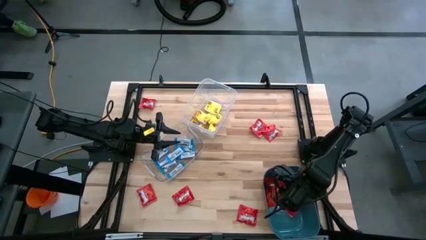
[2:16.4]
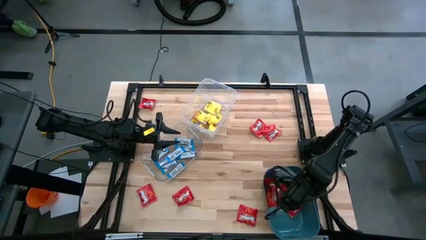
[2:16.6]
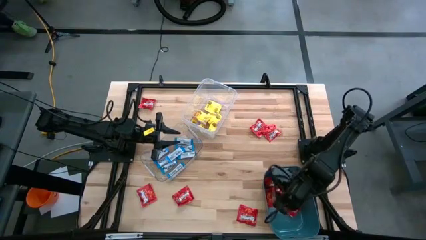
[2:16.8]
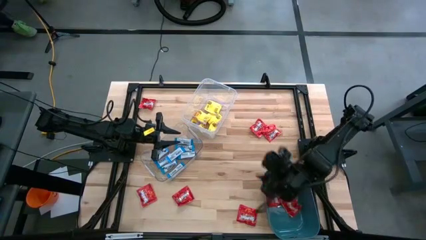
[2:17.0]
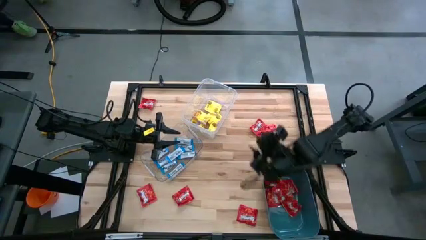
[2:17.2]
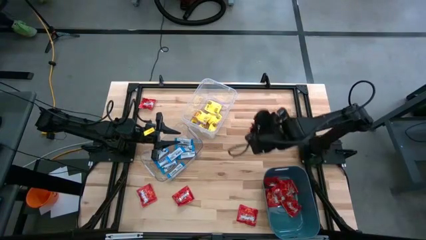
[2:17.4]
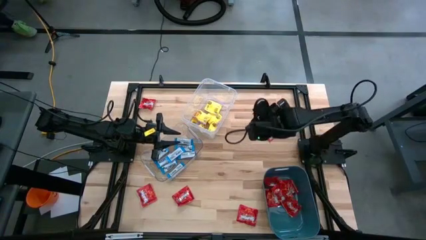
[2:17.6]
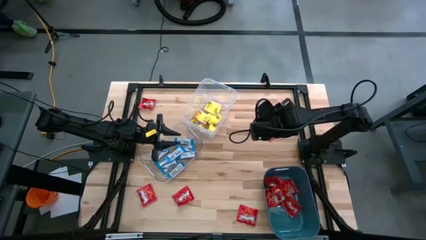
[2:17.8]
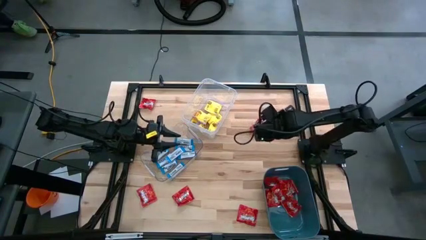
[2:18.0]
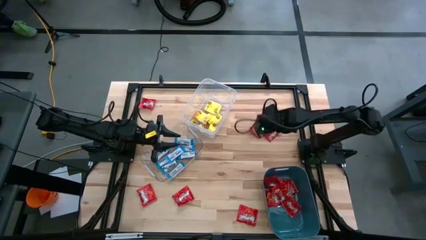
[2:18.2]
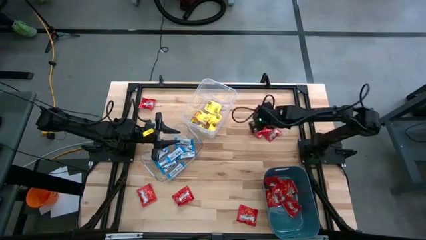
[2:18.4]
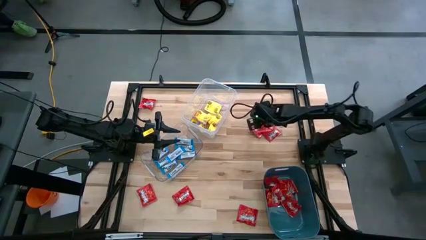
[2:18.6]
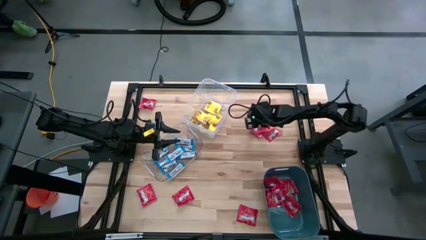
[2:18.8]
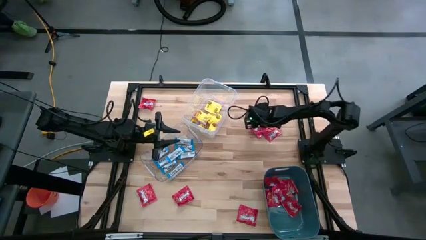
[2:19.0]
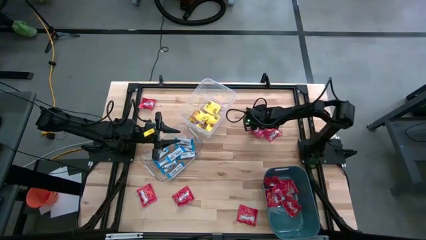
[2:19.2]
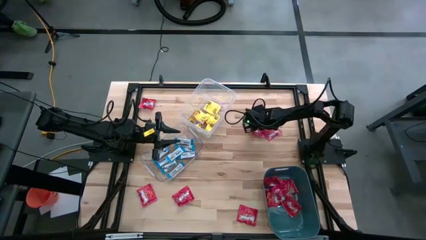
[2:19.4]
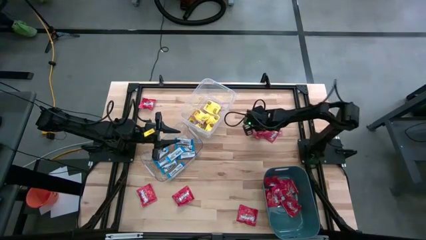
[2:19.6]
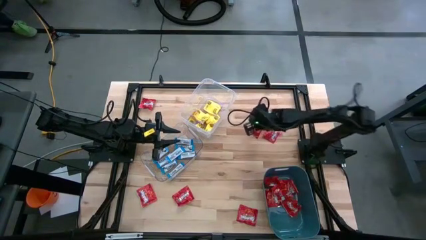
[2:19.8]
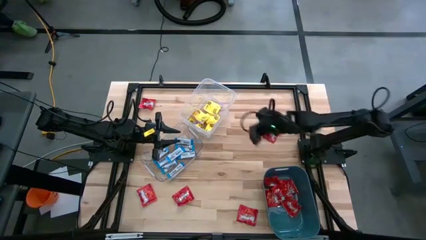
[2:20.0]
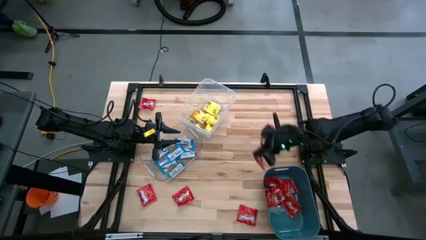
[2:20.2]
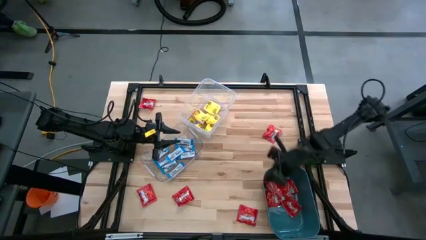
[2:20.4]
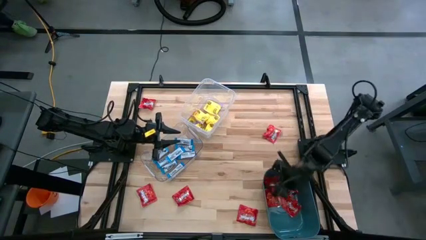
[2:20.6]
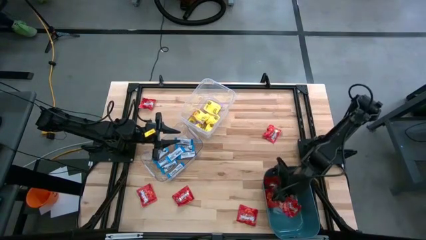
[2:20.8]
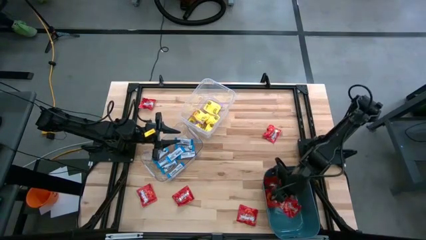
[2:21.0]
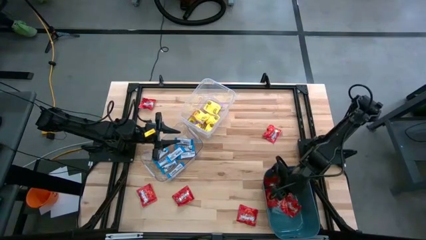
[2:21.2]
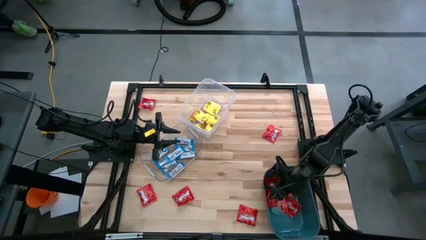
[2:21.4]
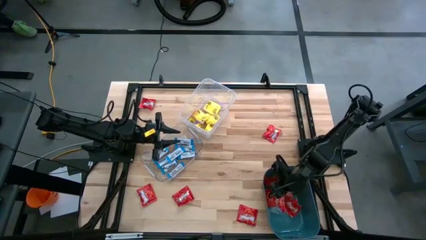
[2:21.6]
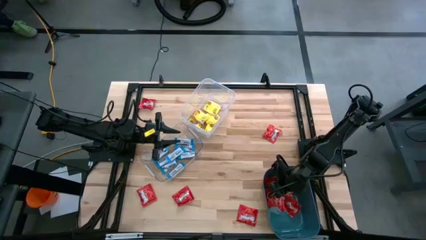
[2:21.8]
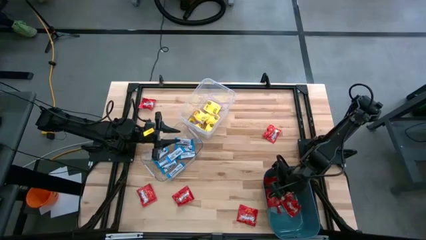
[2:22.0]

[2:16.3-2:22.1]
Task: Sort candy
Put the red candy into the blue bin

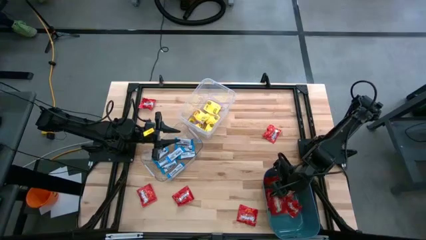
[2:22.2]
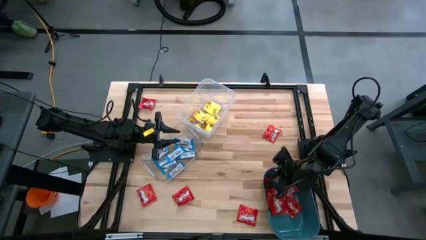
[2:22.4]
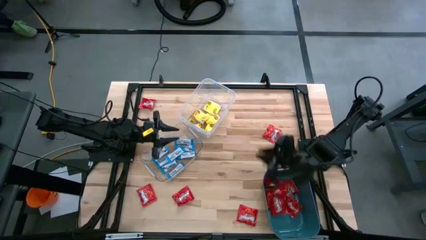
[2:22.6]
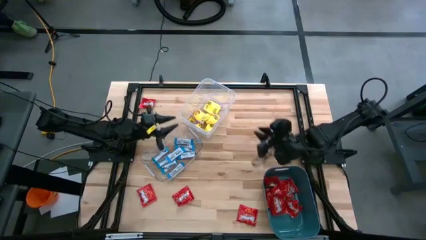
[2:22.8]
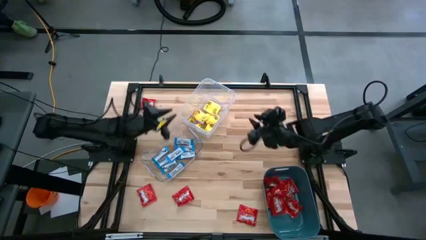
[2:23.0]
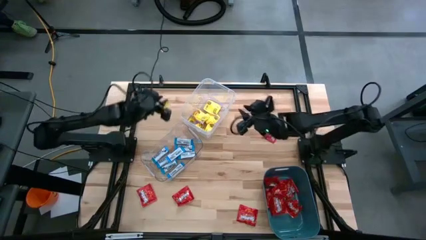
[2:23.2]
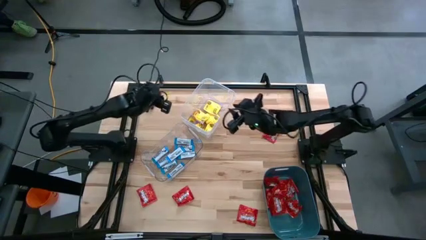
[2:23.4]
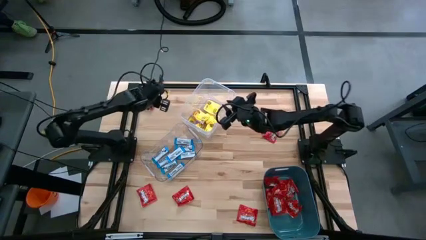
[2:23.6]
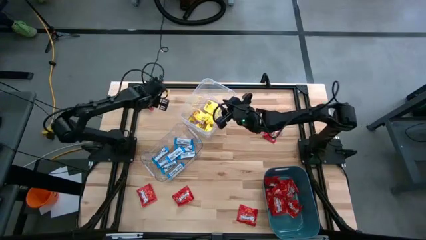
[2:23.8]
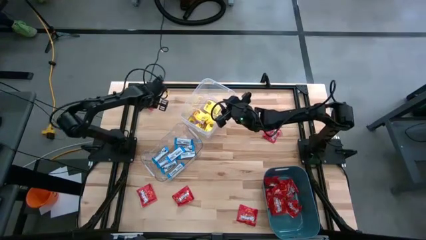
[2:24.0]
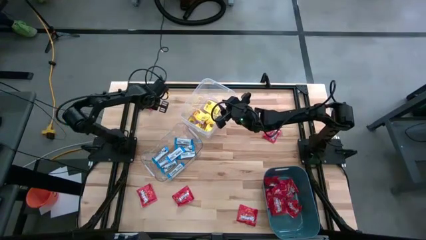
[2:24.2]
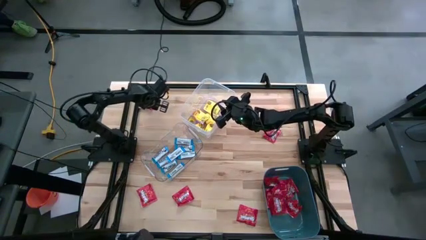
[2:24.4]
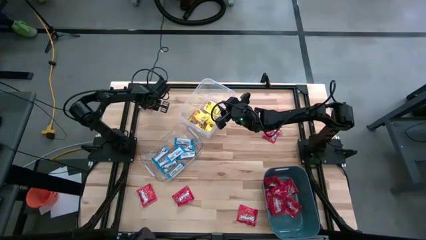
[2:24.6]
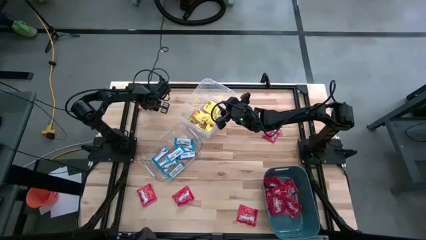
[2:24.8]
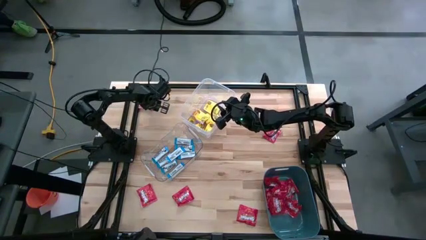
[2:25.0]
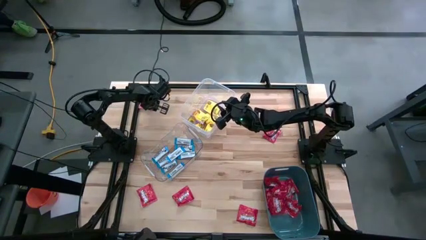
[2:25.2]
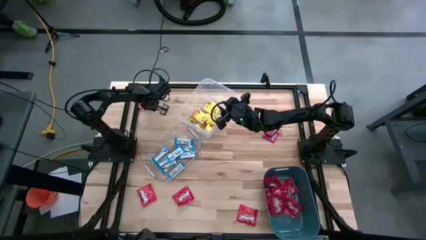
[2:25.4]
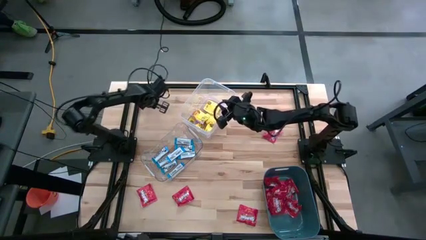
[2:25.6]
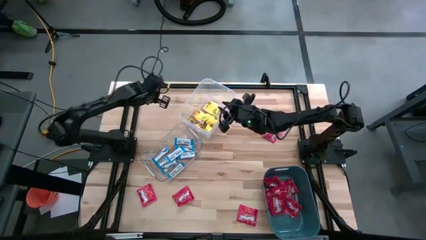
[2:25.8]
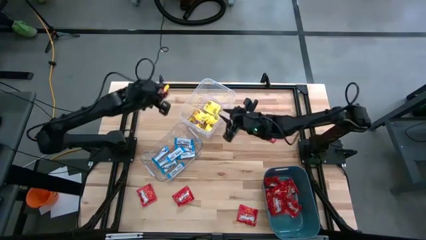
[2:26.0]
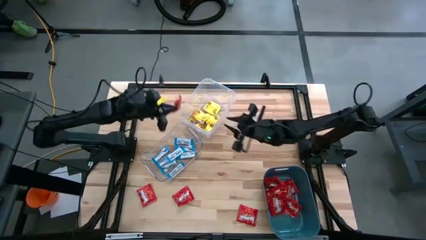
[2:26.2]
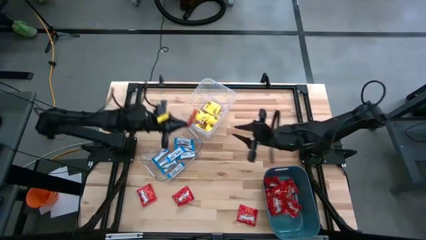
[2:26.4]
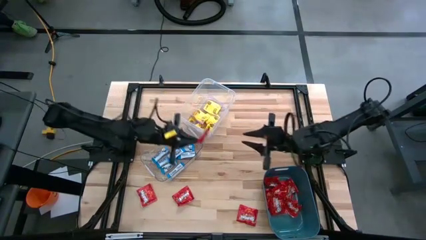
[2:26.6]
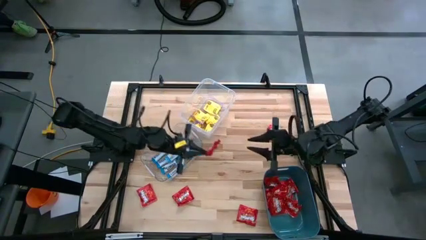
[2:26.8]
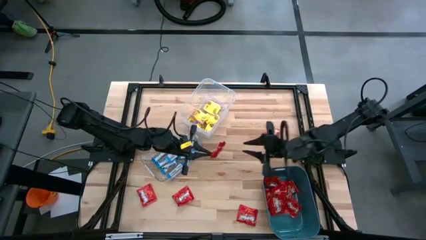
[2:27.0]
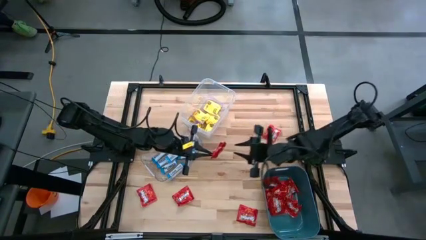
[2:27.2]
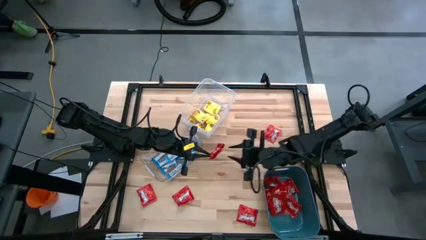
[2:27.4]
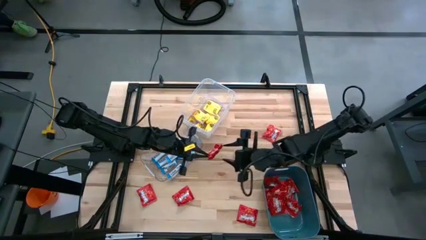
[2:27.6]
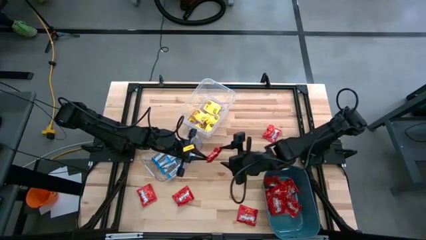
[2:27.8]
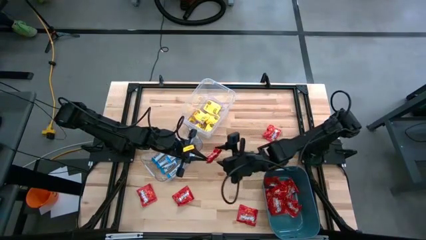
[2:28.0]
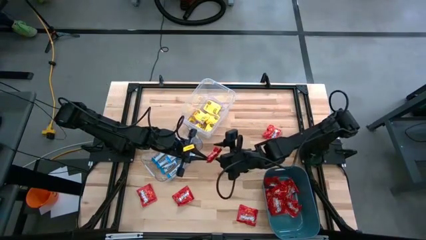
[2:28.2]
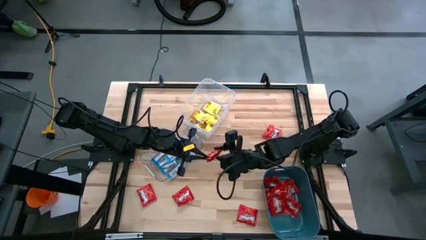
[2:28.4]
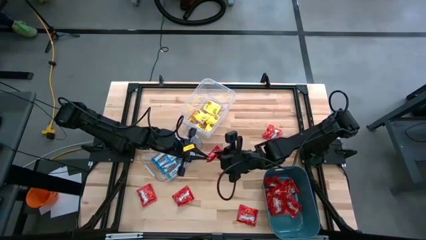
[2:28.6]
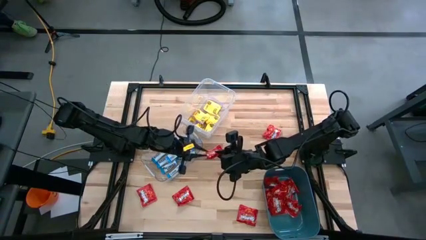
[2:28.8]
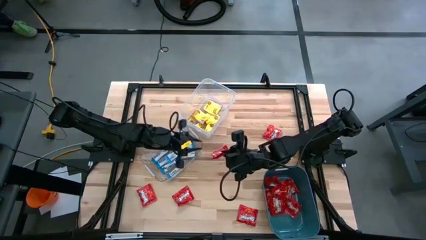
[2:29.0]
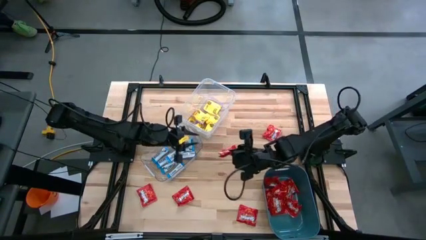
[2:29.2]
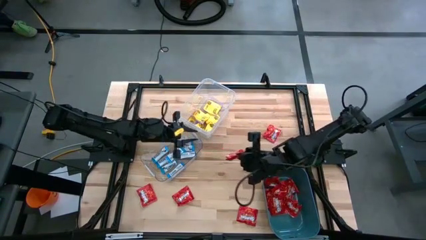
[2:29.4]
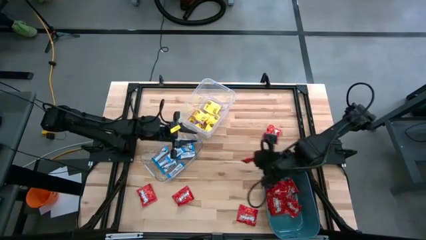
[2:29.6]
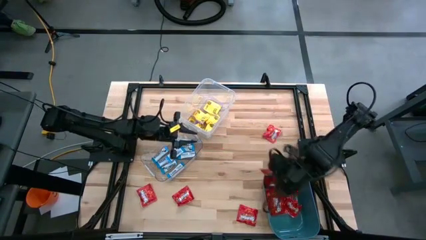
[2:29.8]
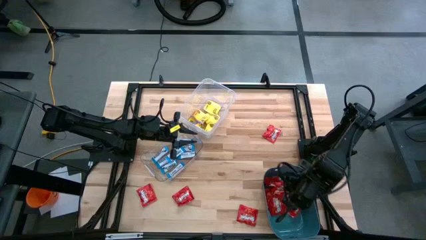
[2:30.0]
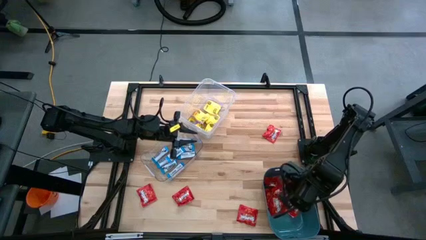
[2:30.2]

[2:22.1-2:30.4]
Put the red candy into the blue bin

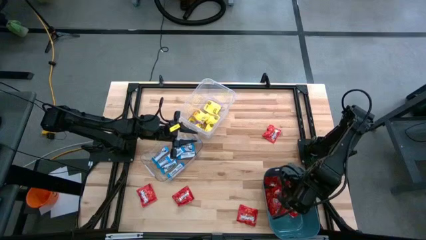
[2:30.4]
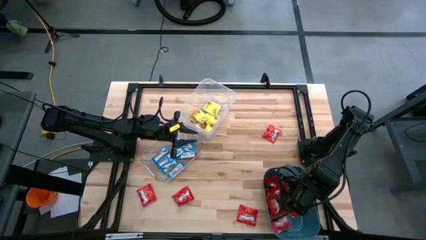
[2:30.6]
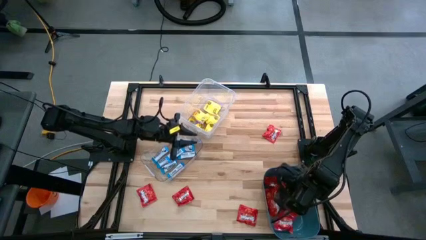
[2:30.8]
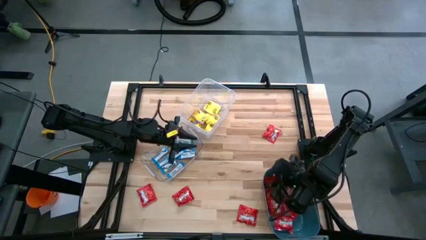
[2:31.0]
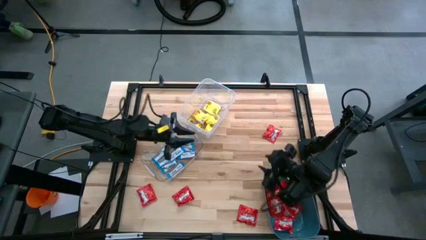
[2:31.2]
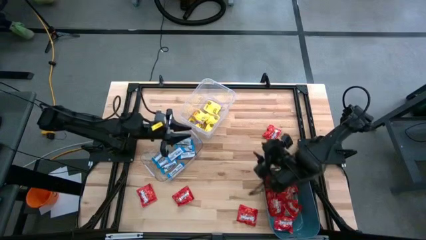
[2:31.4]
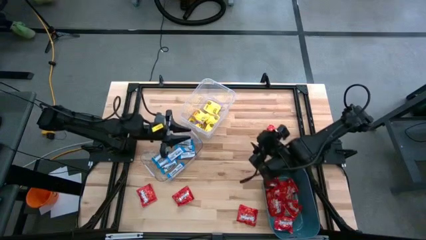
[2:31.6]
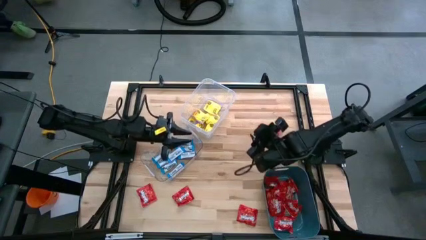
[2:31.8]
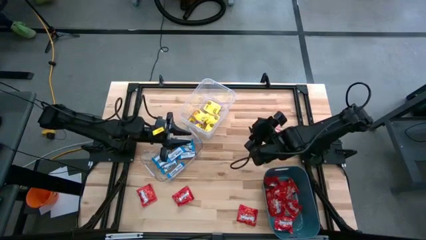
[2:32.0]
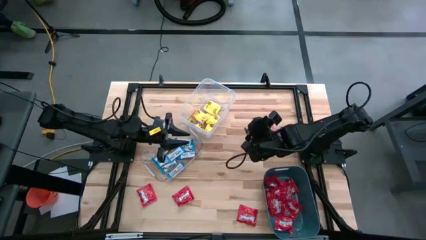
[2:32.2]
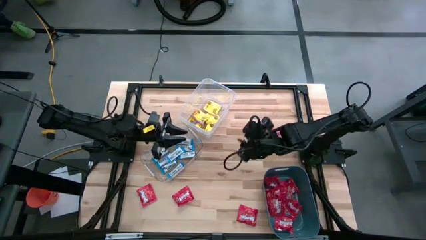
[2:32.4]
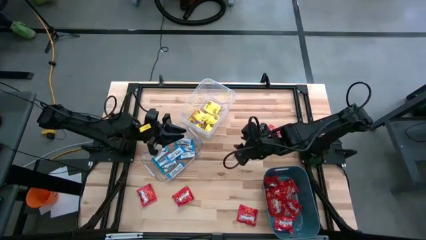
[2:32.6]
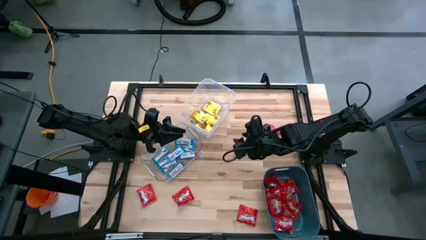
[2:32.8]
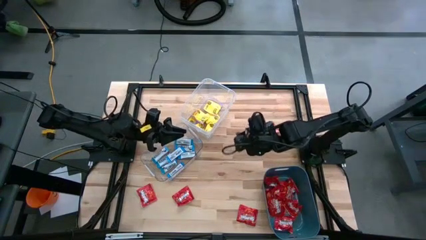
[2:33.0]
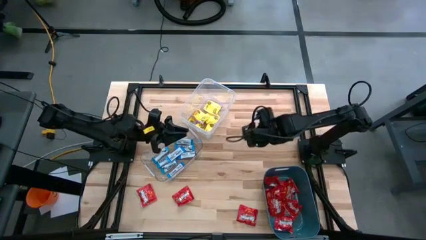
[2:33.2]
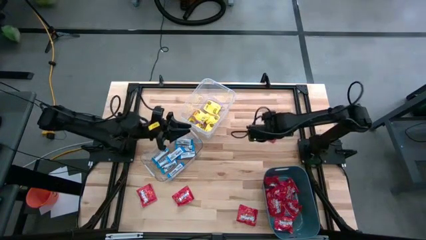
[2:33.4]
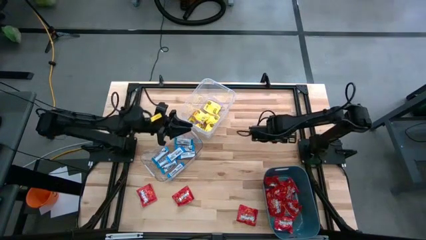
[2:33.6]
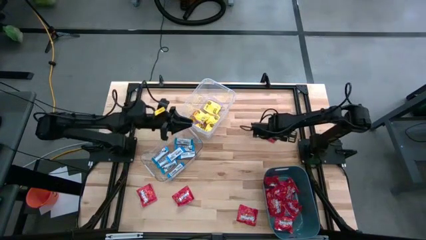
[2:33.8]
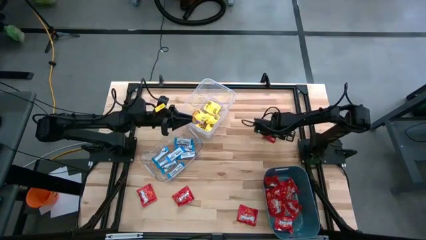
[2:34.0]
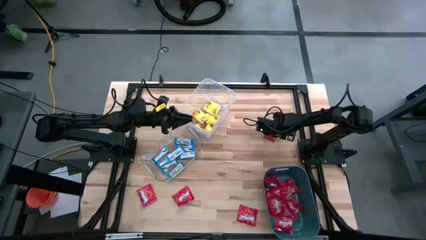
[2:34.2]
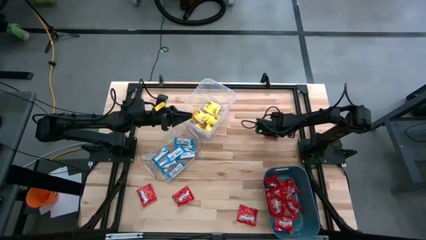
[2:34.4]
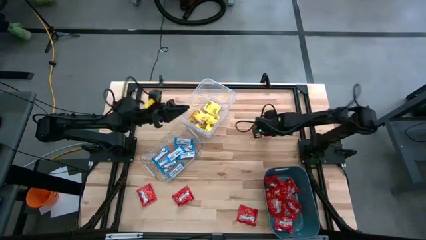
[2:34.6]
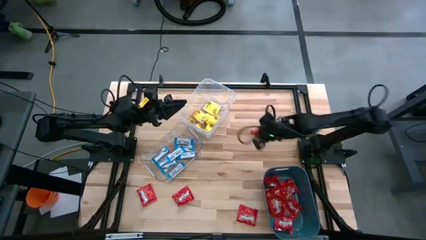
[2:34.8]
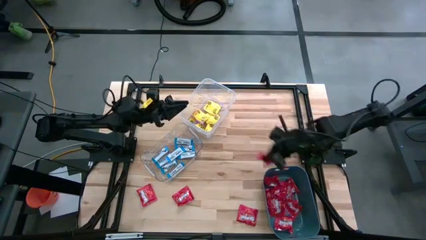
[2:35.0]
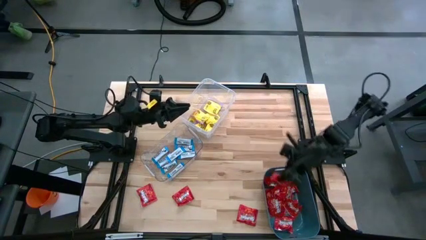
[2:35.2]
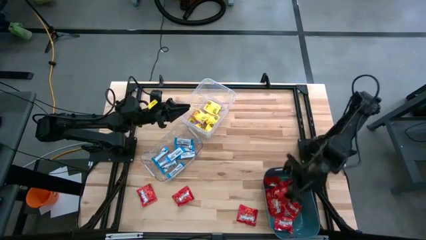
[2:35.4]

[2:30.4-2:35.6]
Put the red candy into the blue bin
